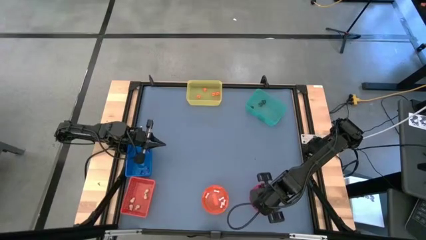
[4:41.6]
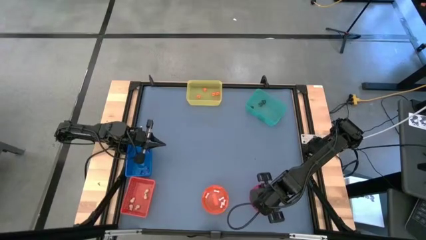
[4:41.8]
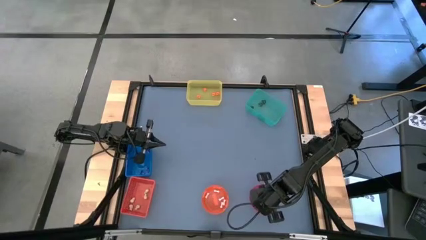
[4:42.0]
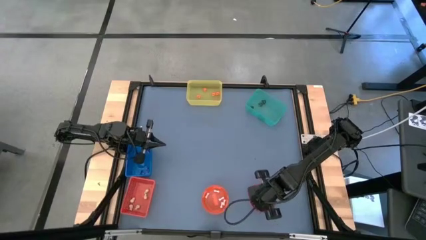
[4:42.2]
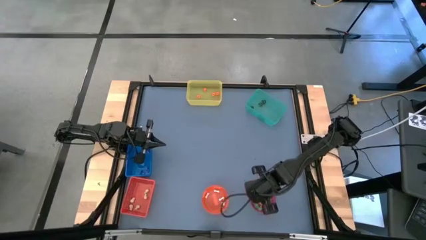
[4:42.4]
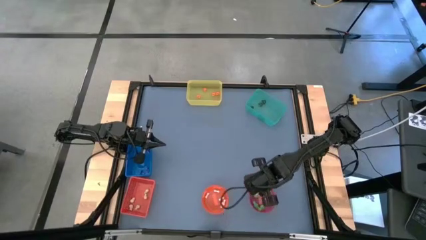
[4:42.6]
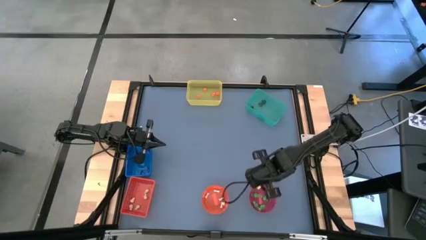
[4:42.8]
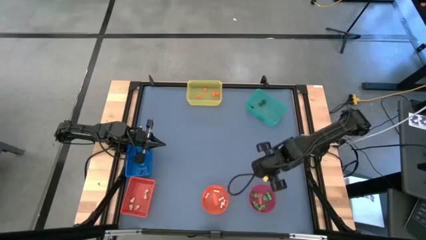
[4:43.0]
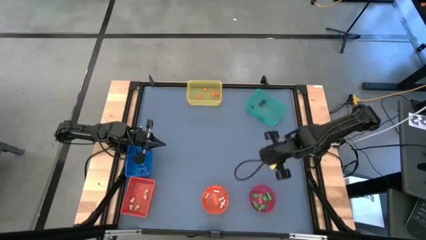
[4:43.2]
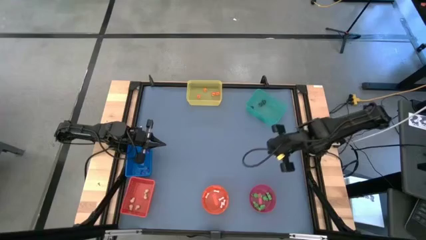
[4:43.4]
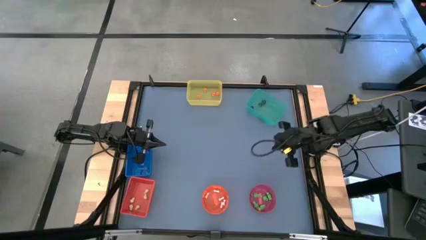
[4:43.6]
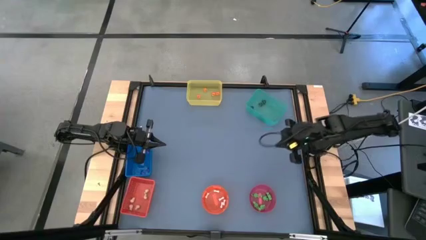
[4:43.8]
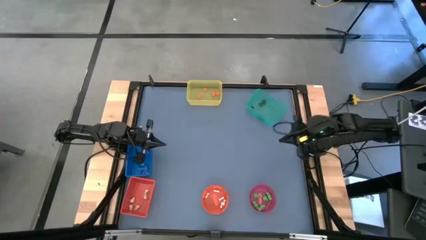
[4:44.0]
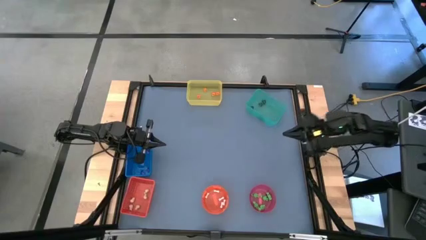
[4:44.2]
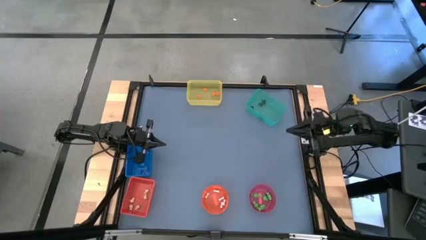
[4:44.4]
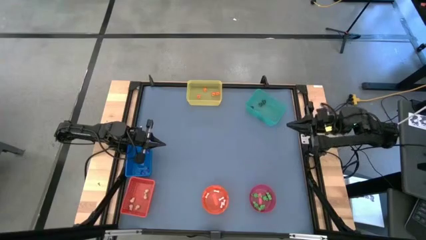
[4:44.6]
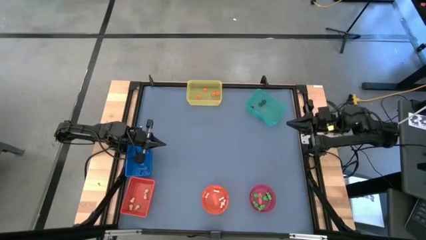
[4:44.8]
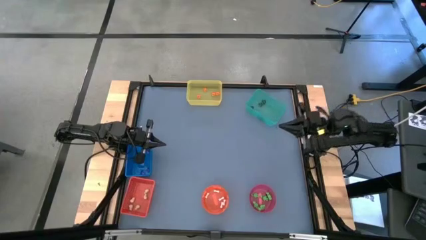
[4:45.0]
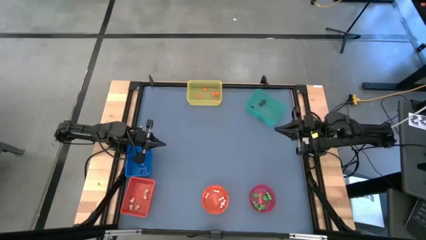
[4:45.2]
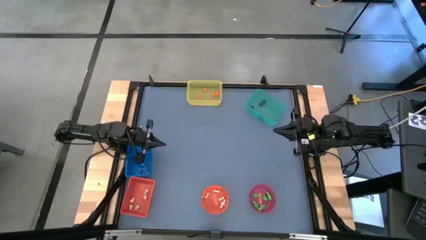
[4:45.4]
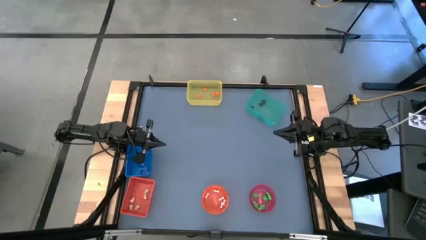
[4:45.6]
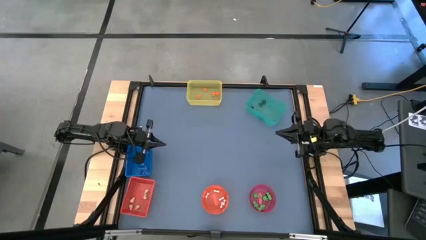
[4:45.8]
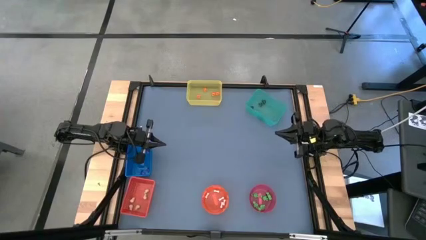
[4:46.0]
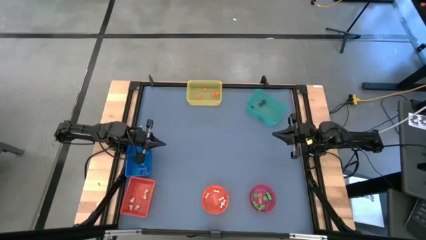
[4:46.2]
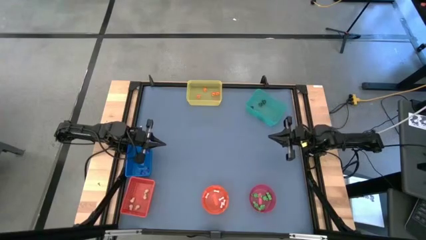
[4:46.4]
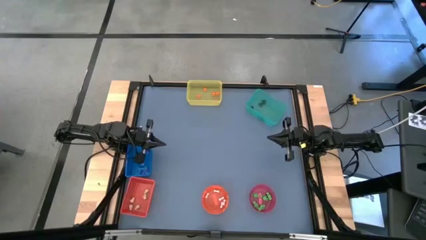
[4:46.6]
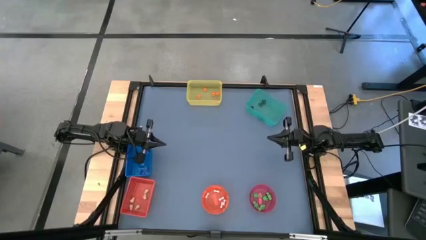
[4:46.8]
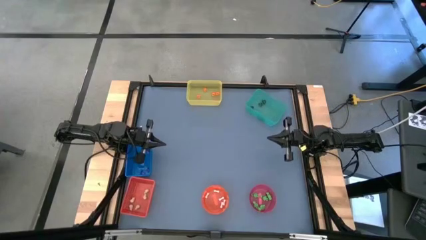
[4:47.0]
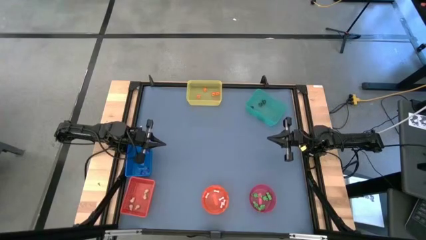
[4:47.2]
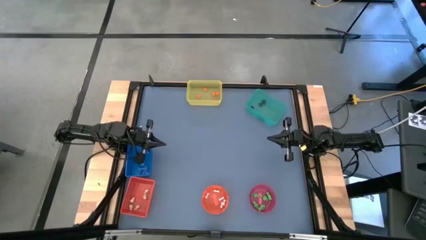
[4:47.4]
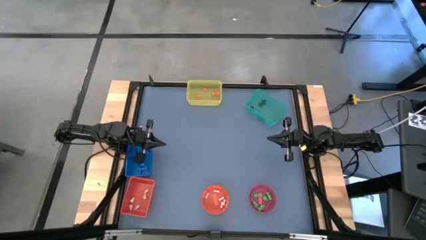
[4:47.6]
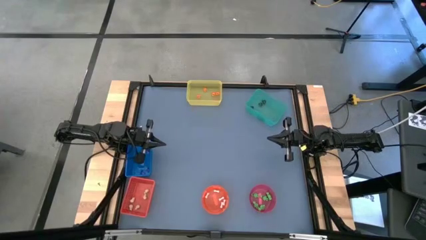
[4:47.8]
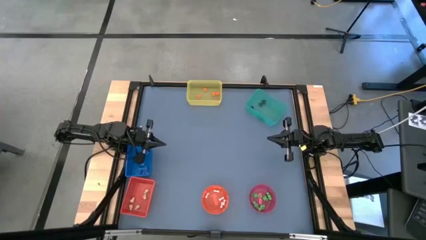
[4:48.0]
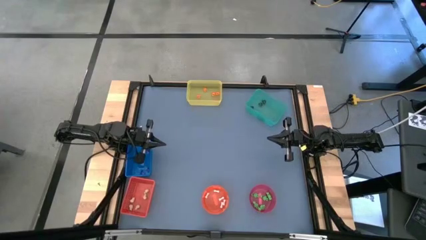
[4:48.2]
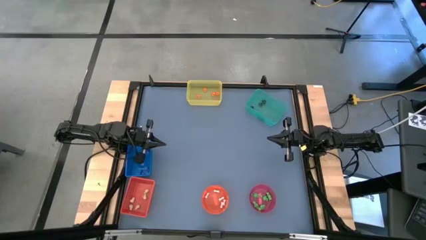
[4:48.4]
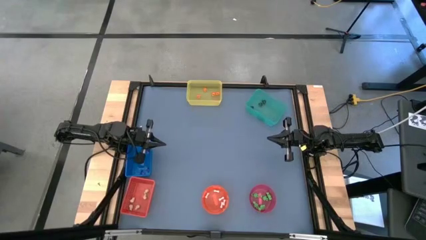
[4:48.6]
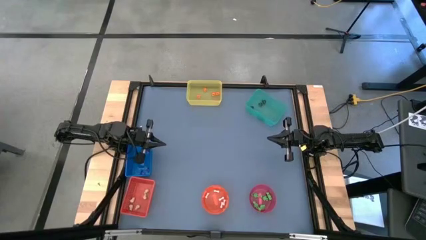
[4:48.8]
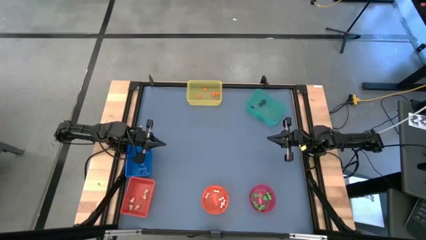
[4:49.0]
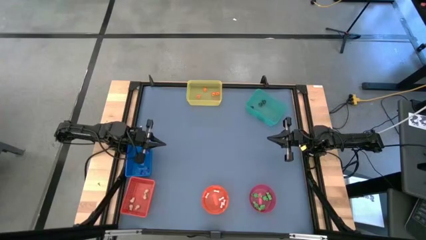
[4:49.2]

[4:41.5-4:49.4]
Task: Sort Halloween decoration
Return to Home Position
